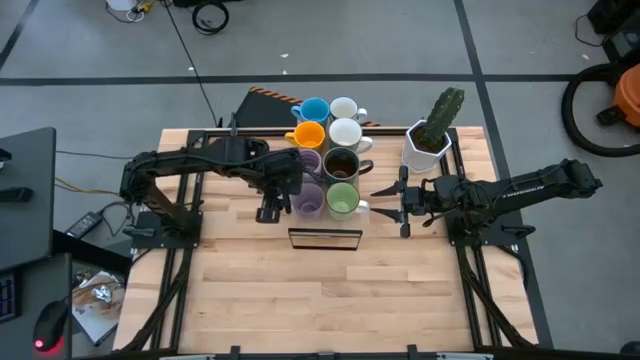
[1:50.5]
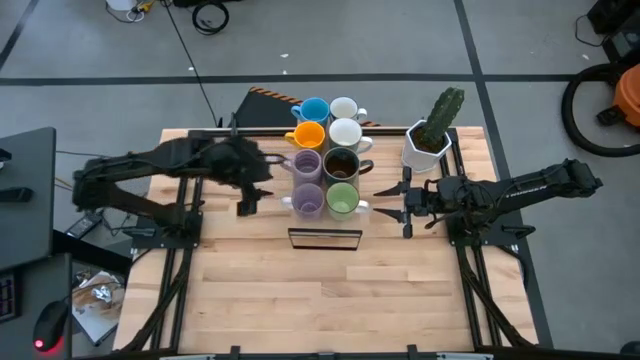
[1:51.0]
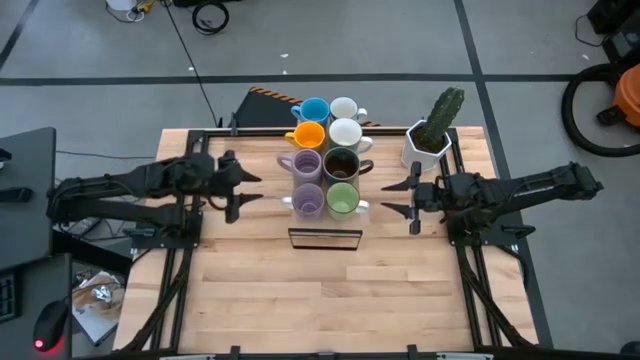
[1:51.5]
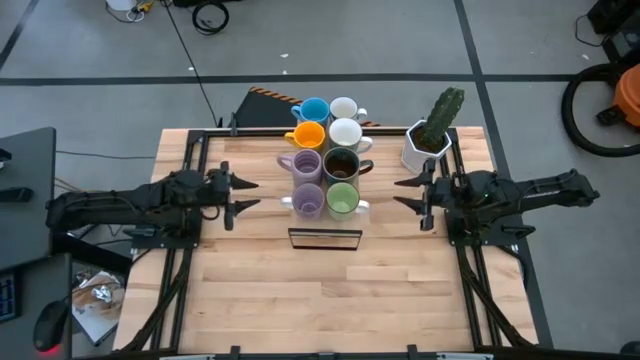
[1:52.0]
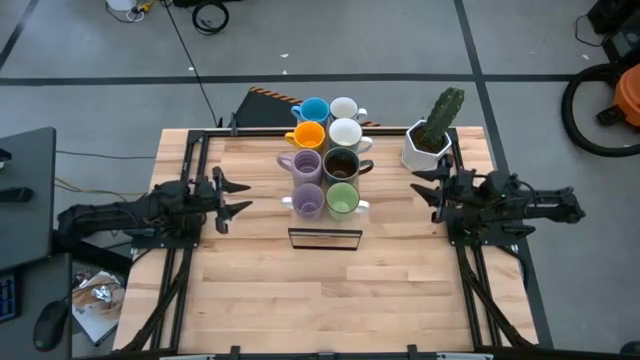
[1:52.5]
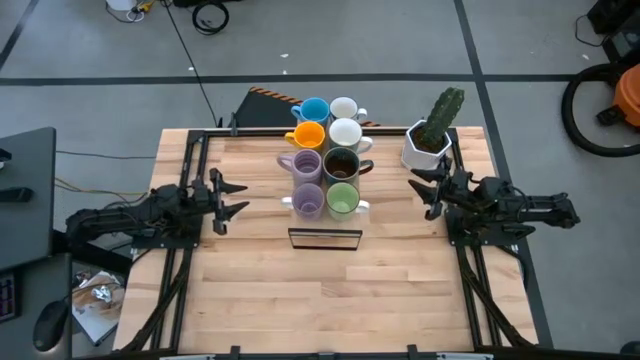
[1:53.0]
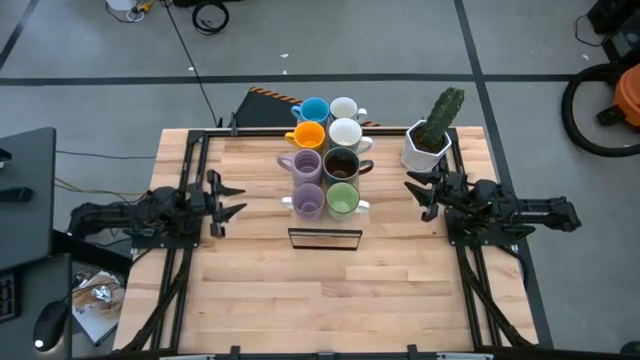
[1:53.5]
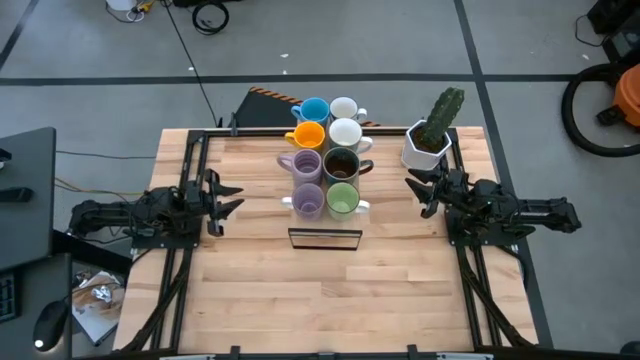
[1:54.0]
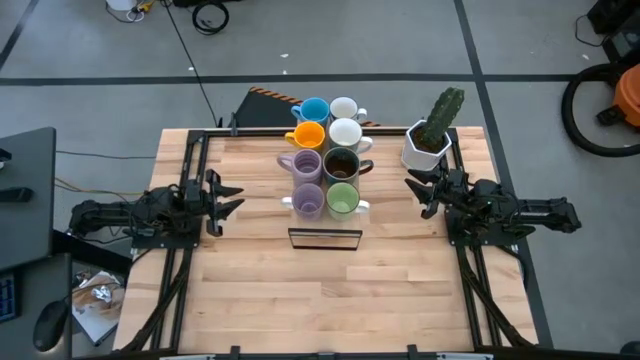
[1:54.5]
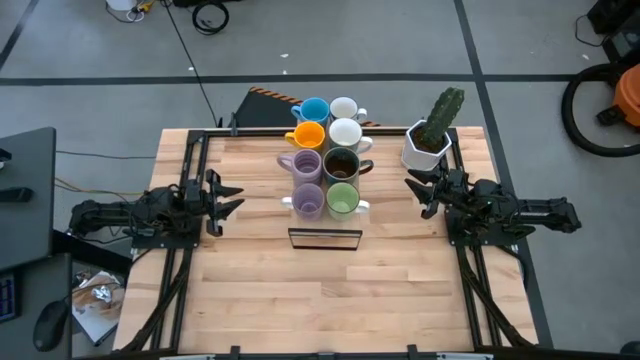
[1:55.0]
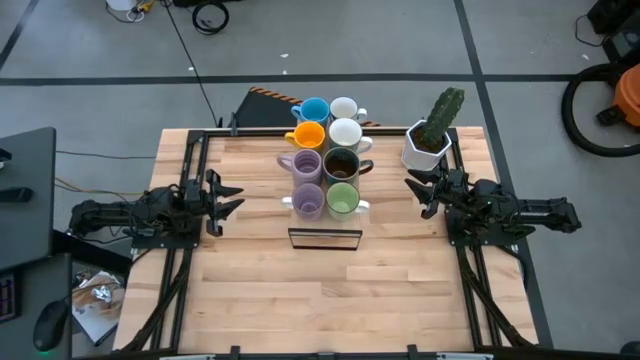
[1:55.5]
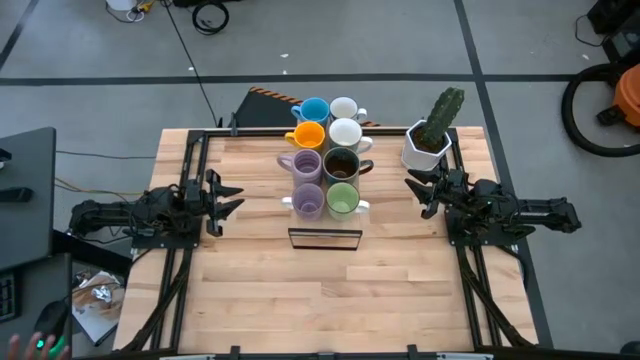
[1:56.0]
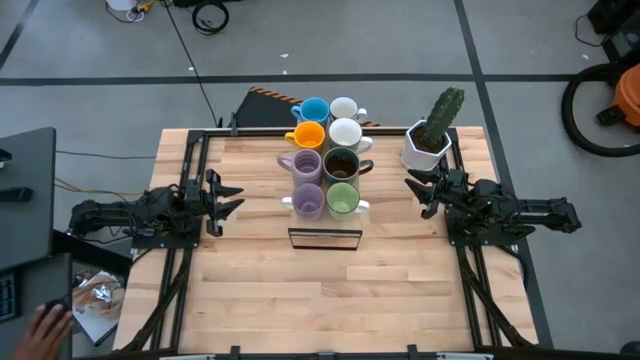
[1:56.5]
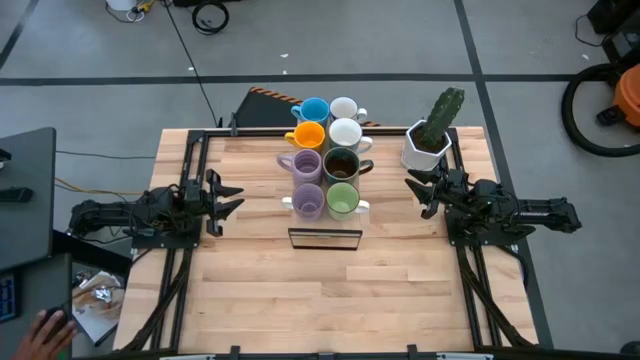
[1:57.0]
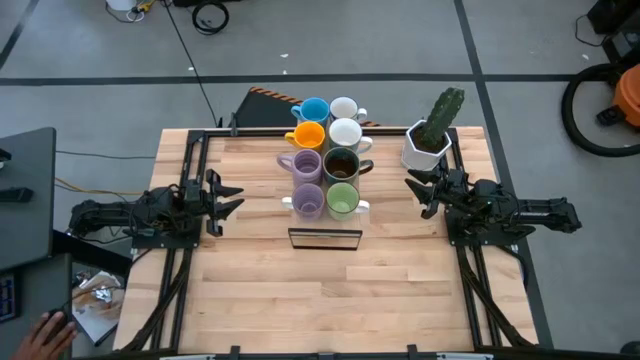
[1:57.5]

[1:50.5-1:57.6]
Task: Place coffee mugs
Return to Home Position

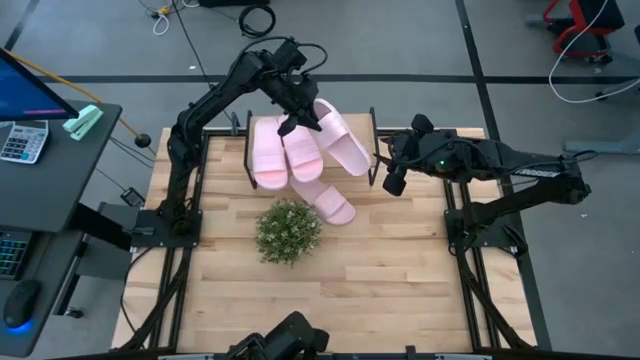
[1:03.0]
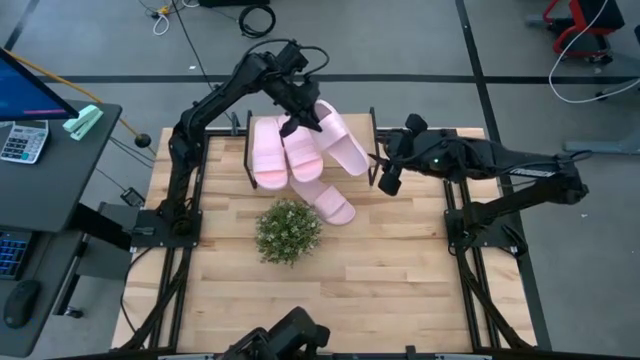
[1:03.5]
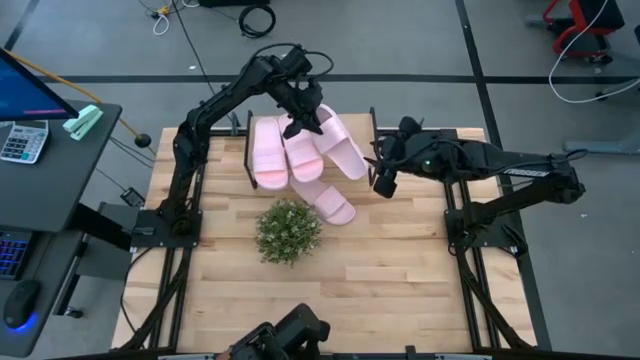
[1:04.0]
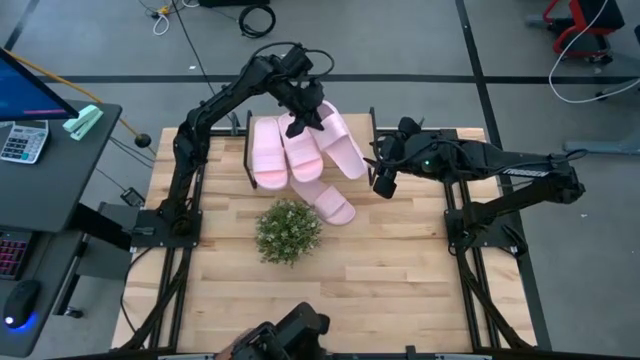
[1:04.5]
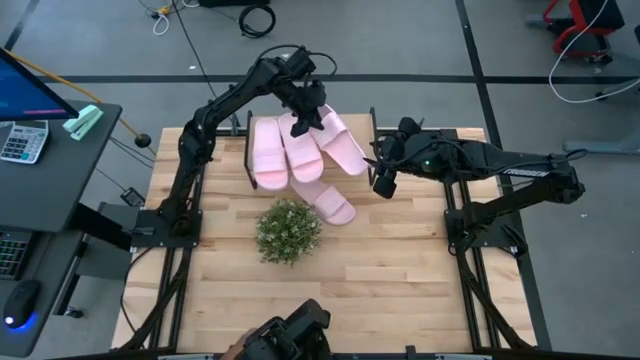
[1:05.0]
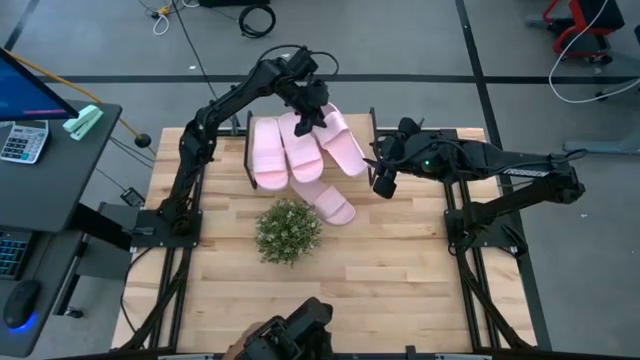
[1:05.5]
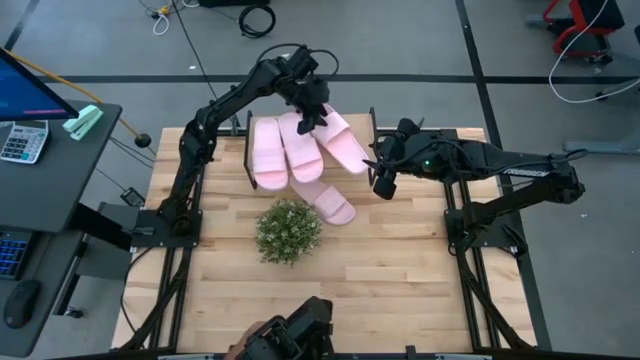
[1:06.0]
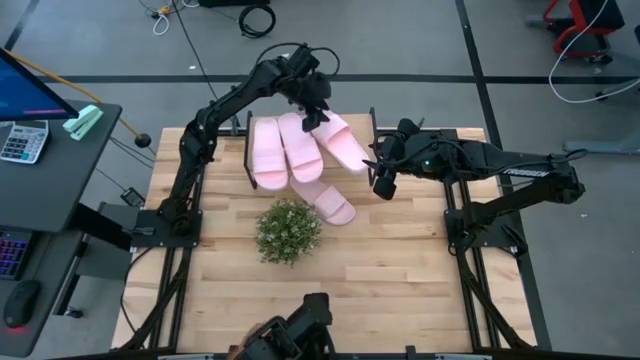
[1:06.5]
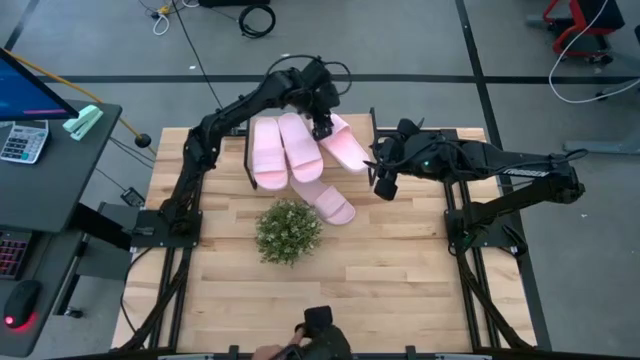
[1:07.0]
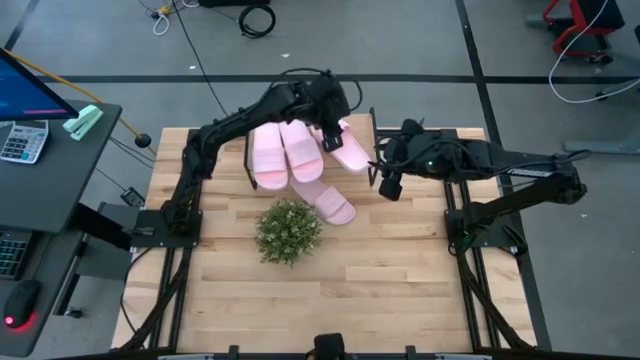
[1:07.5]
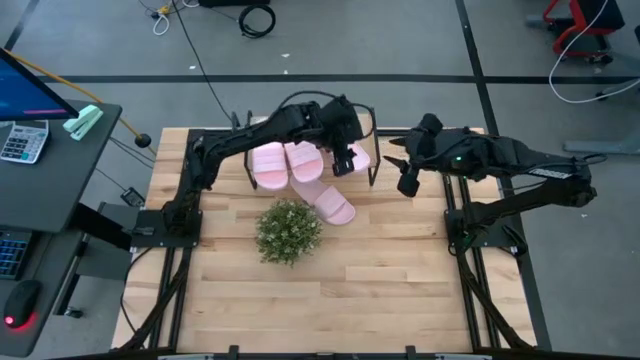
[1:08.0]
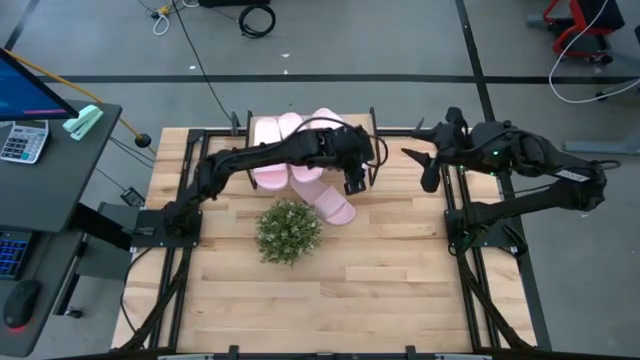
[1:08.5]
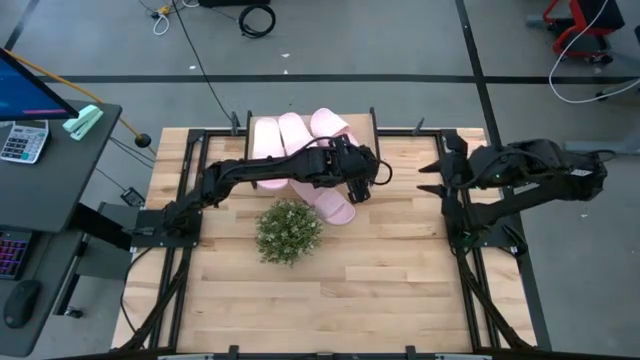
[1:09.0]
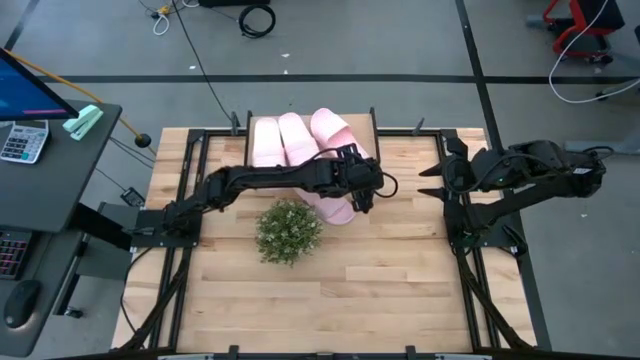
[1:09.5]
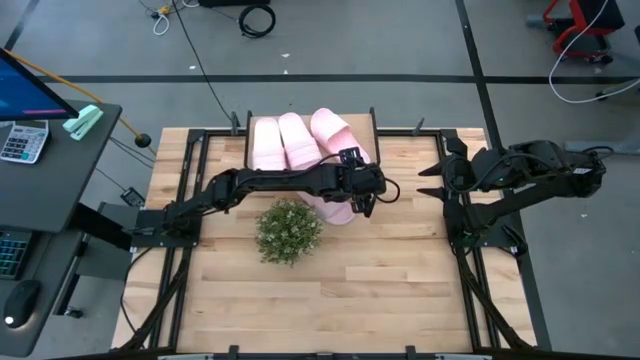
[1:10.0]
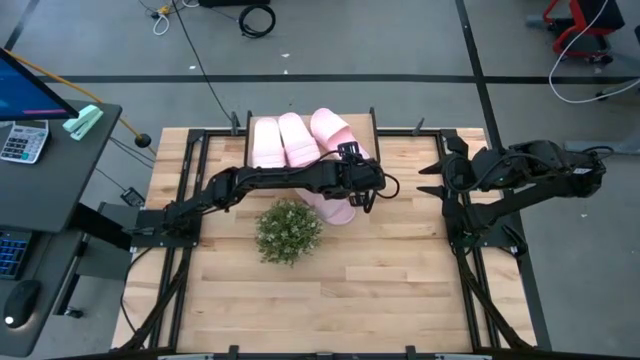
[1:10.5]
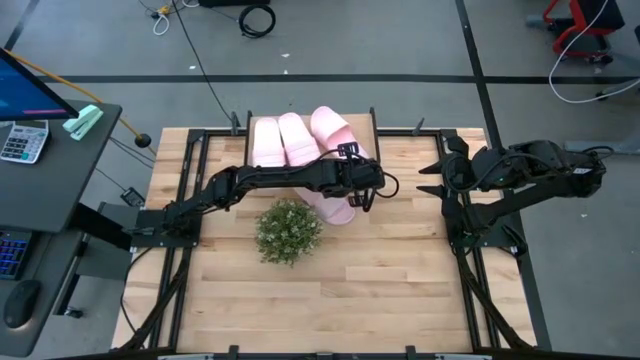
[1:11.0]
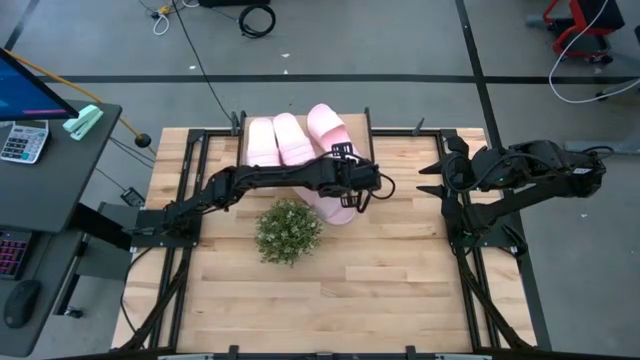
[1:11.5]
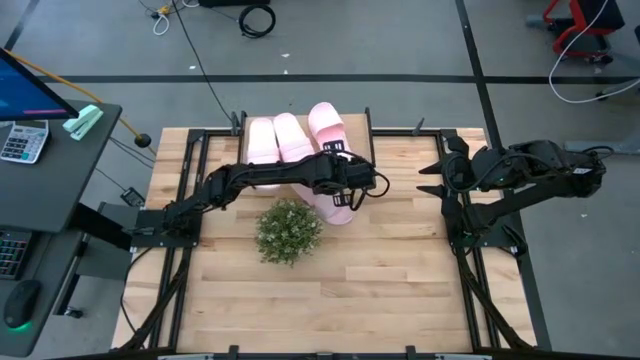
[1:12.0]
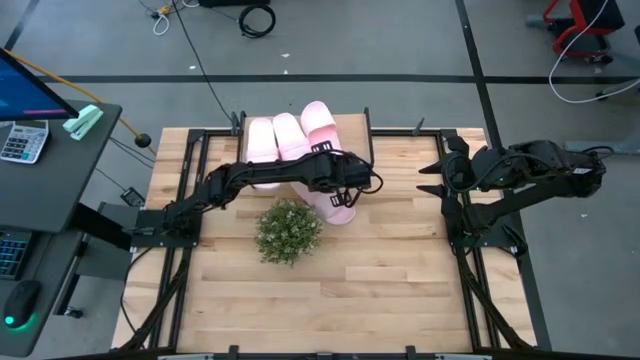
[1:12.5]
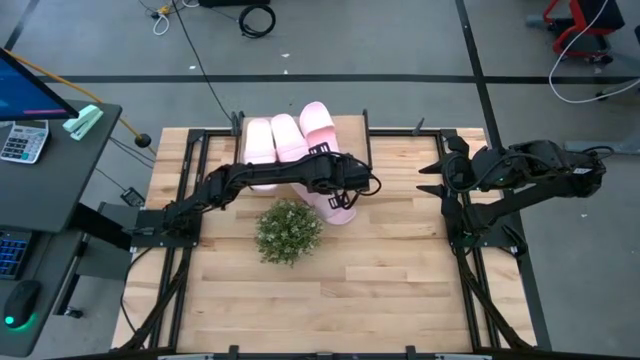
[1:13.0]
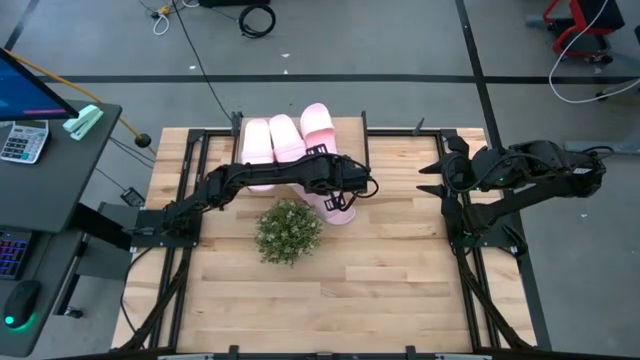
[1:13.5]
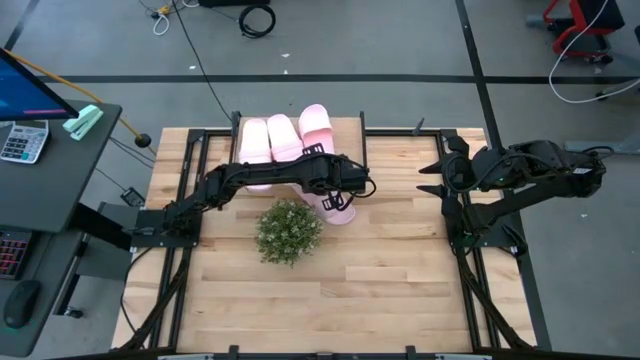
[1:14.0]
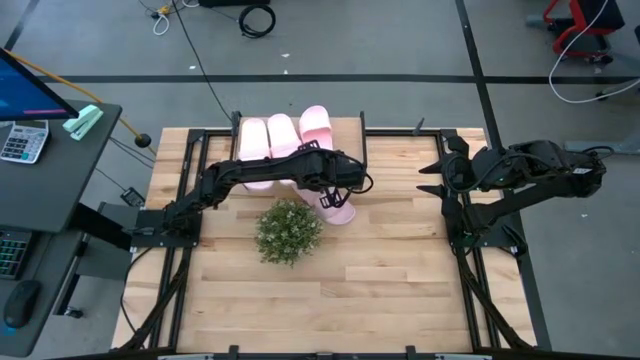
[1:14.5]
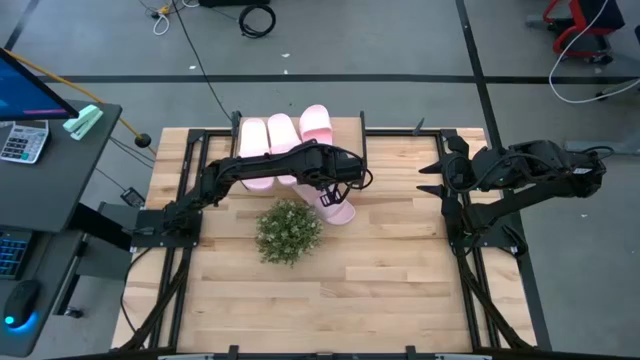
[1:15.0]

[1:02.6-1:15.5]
Task: Pick and place slides into the shelf
Put the pink slide on the shelf
